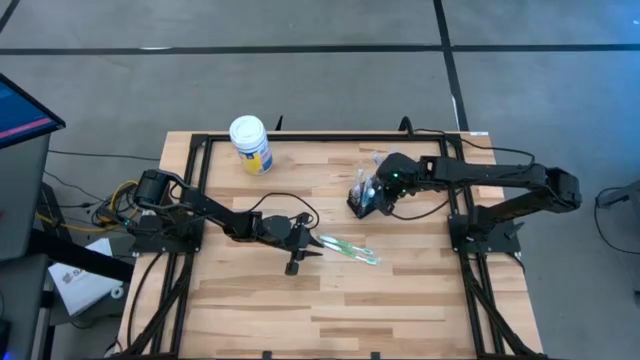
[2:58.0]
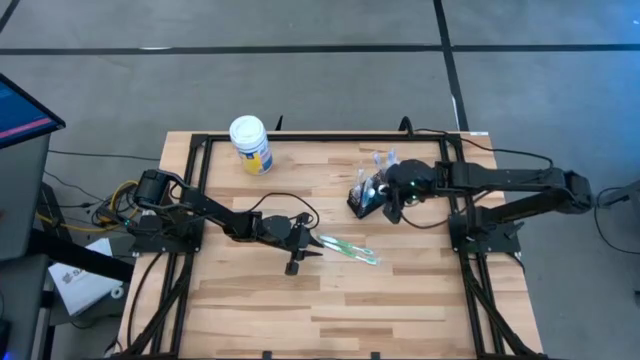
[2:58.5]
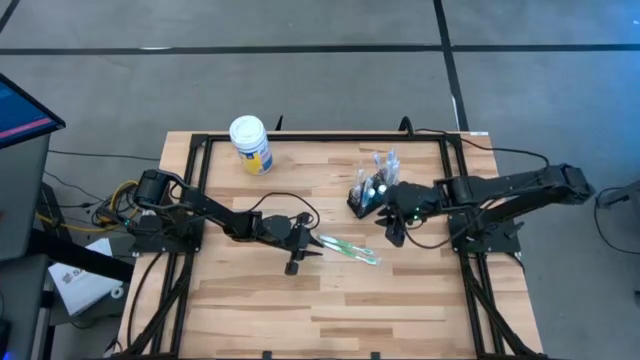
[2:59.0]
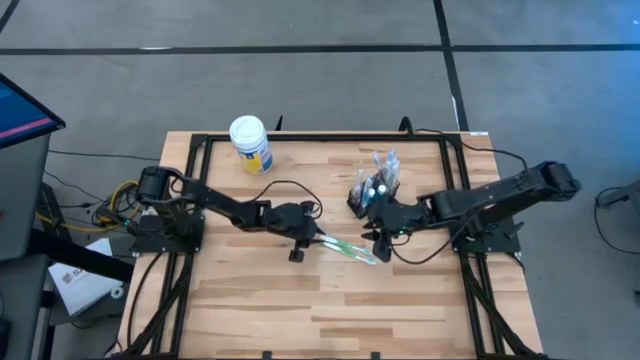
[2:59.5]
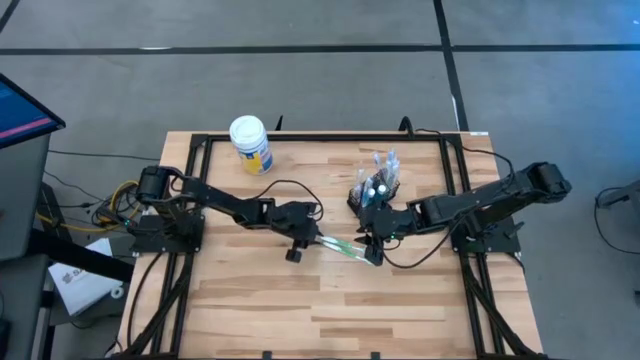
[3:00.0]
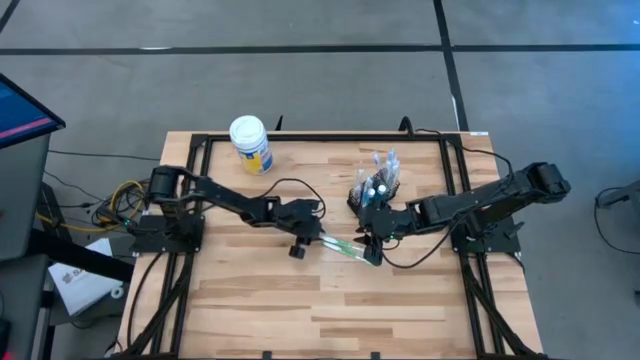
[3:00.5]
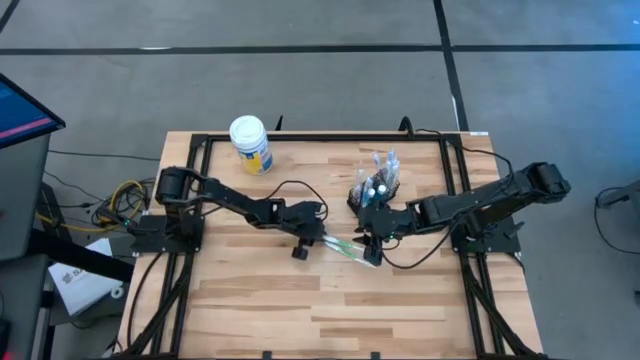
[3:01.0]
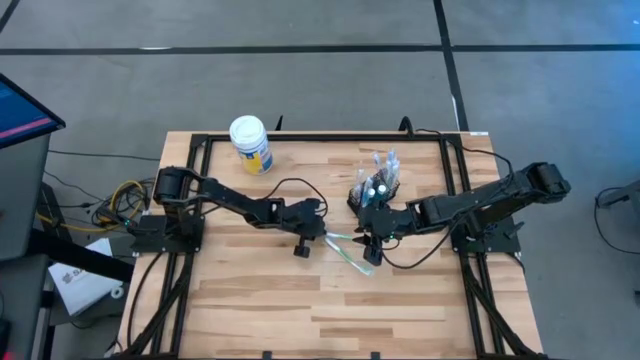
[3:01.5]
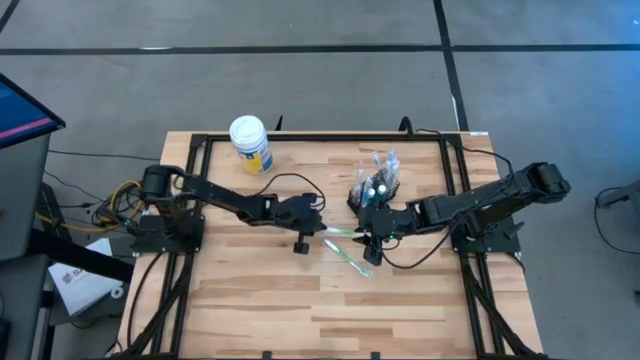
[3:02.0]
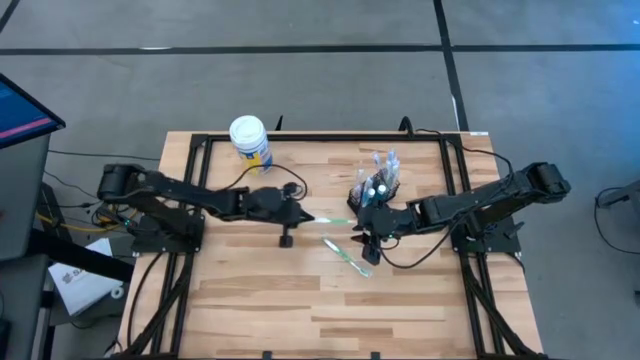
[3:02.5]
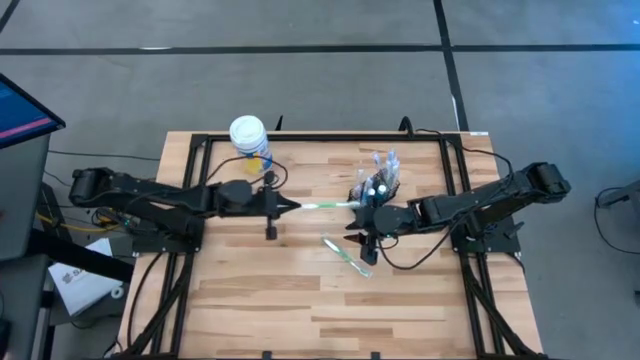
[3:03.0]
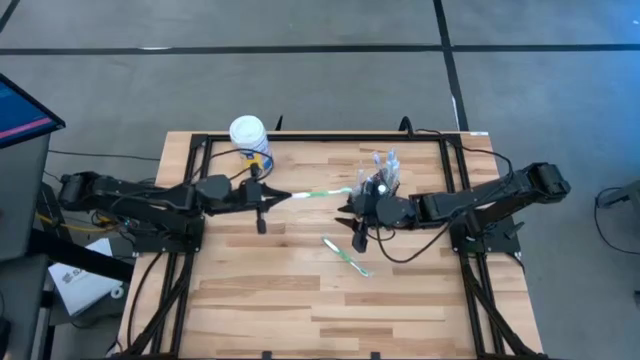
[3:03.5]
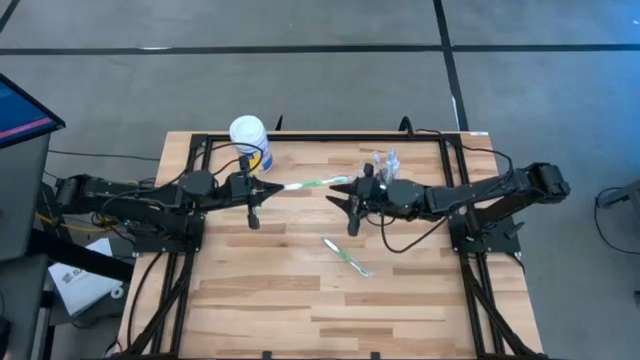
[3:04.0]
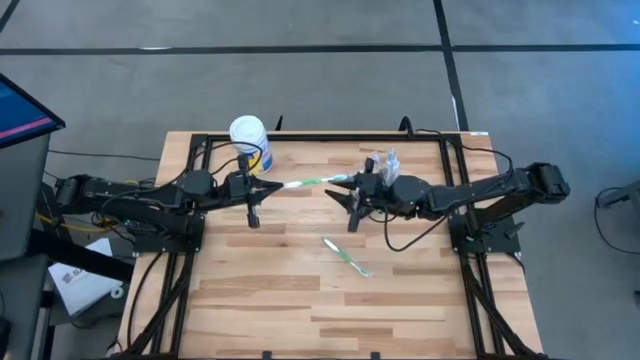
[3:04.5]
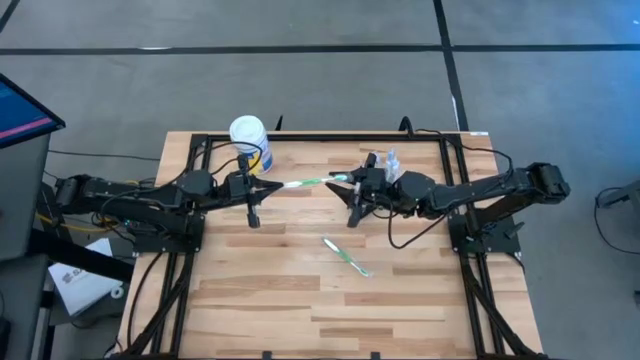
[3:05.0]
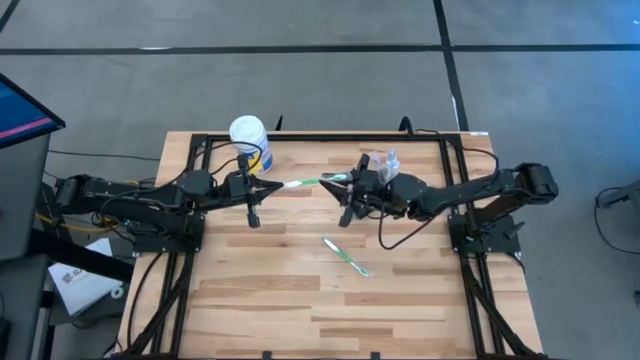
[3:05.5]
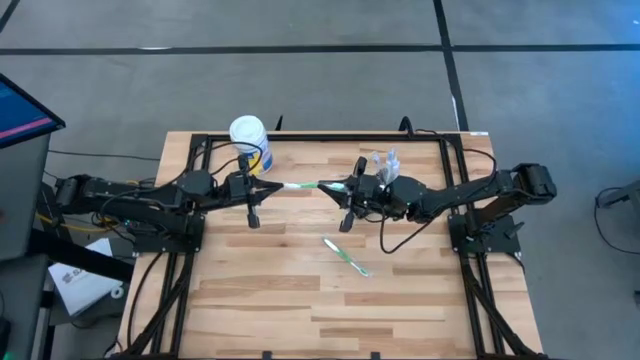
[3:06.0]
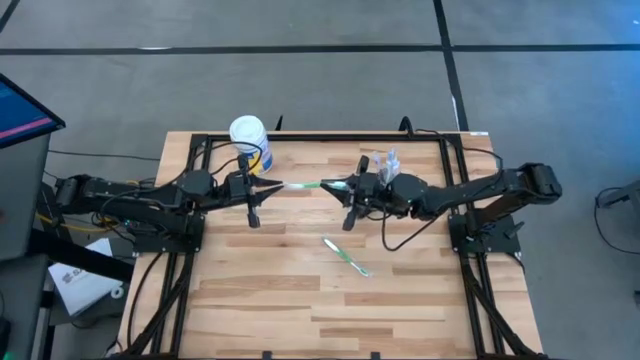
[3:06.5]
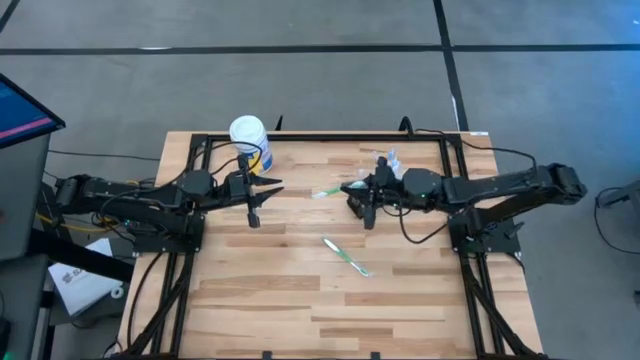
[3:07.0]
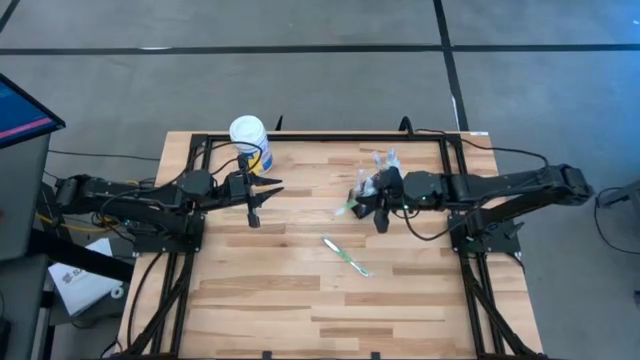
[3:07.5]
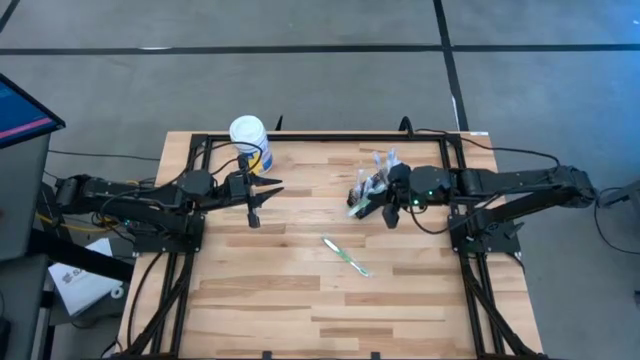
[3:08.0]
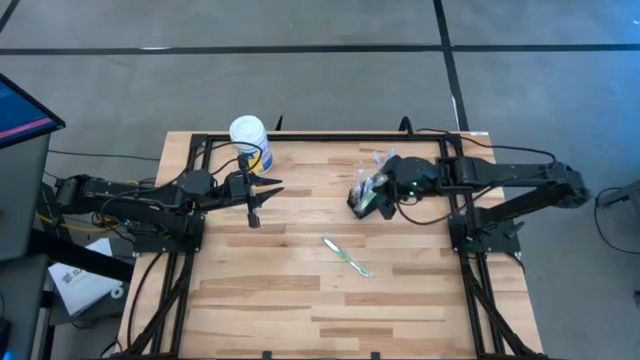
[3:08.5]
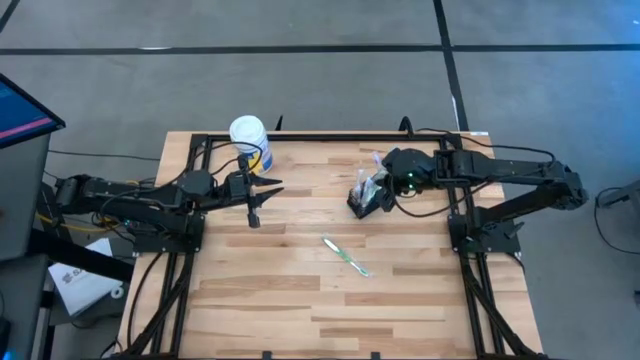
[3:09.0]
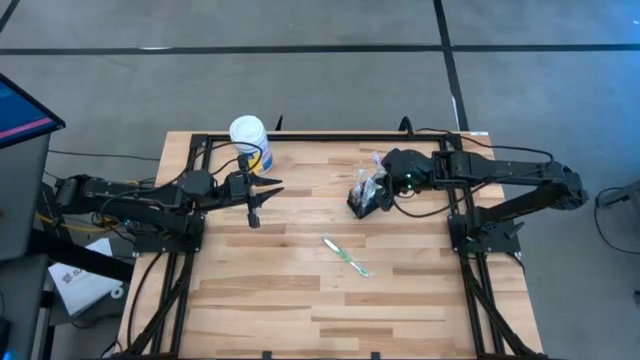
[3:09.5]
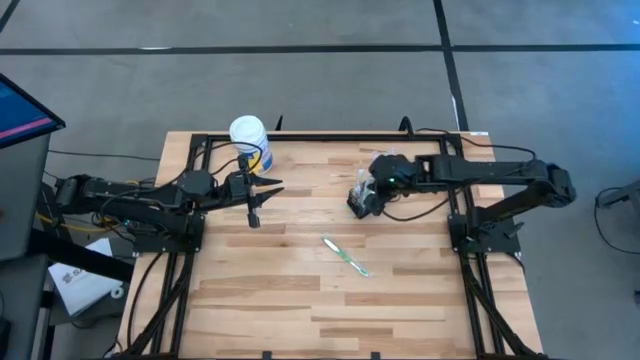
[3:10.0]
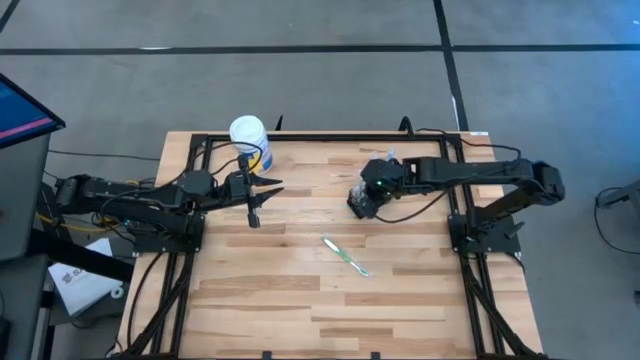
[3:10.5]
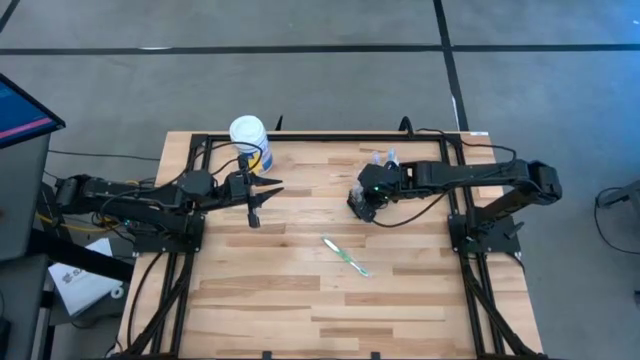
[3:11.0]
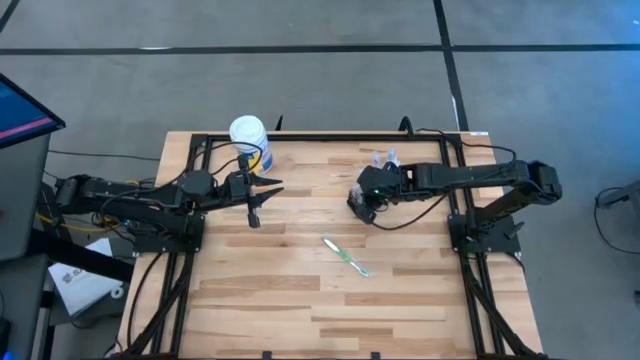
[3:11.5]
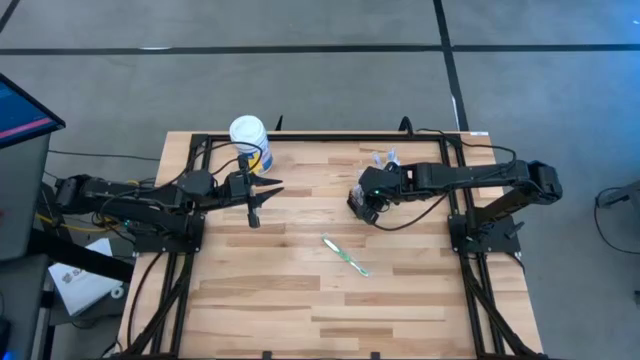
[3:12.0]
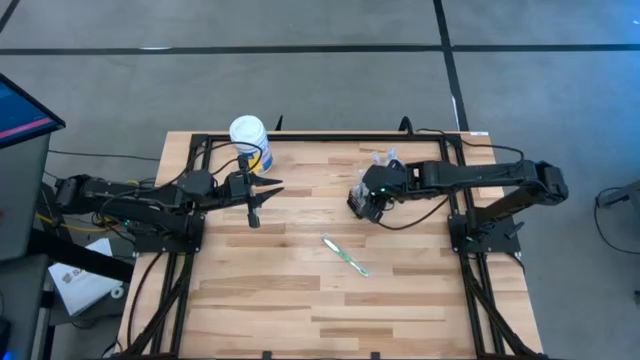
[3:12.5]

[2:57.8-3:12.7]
Task: Pick & Place toothbrushing station
Put the green toothbrush into the mesh organizer

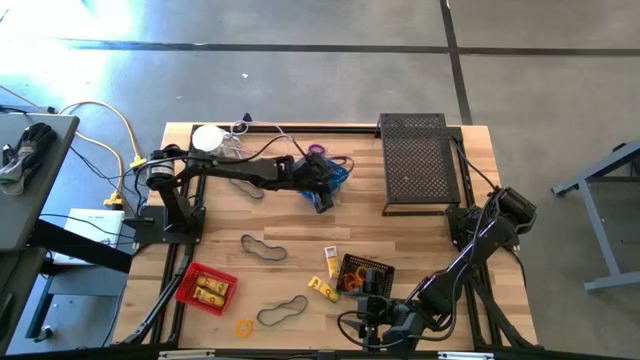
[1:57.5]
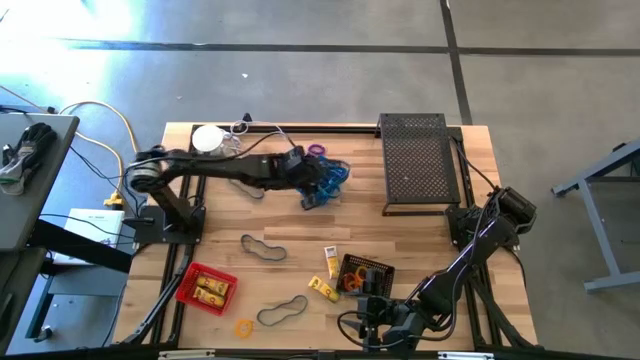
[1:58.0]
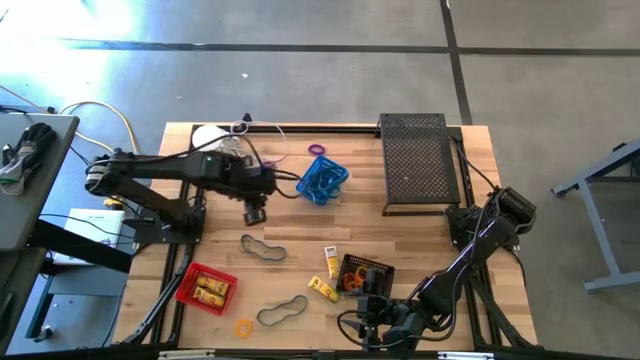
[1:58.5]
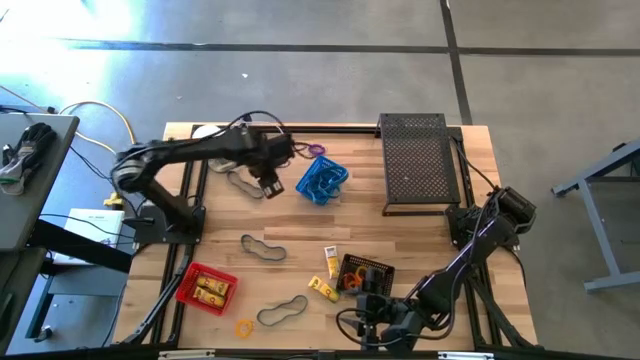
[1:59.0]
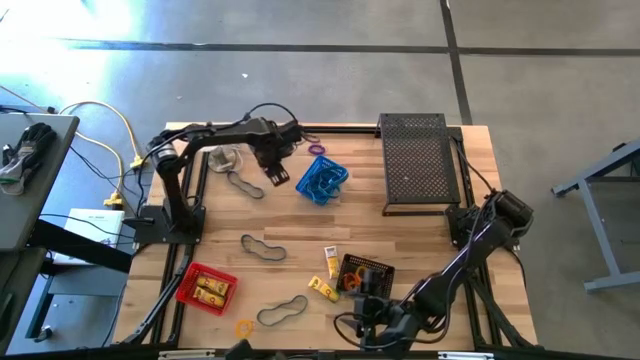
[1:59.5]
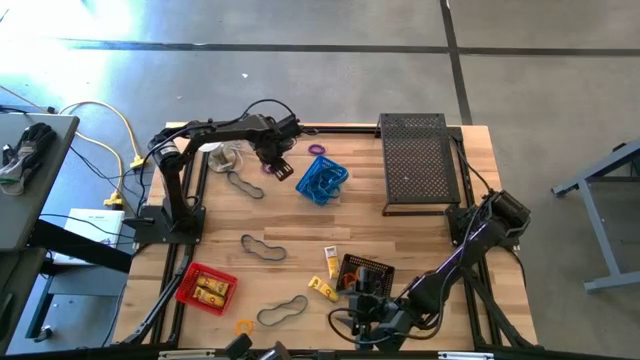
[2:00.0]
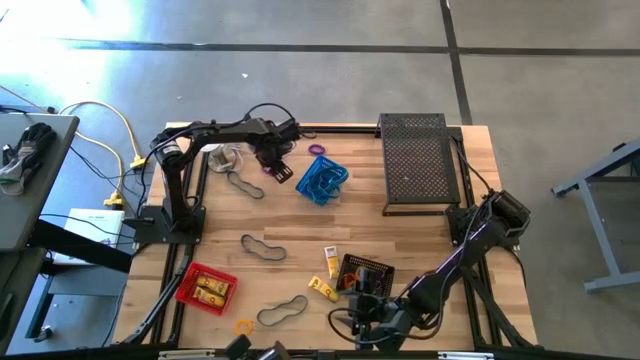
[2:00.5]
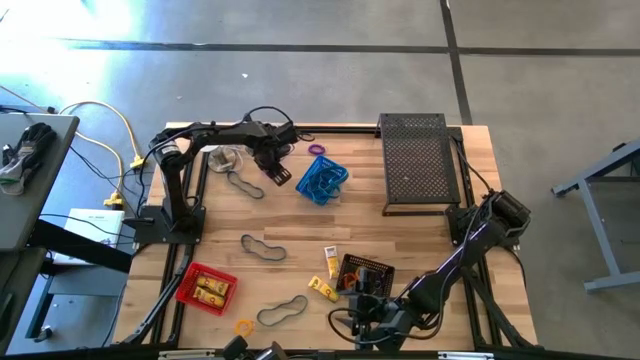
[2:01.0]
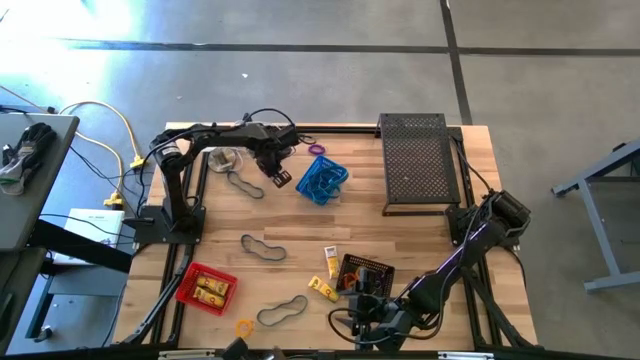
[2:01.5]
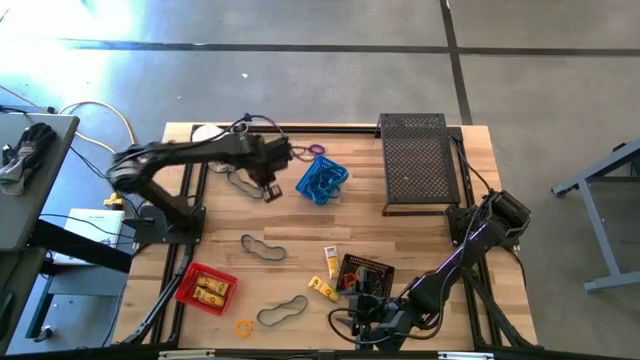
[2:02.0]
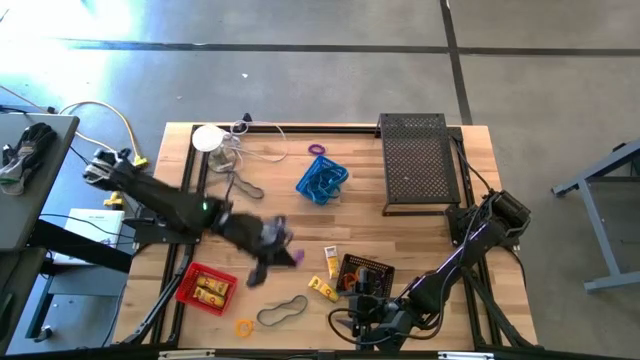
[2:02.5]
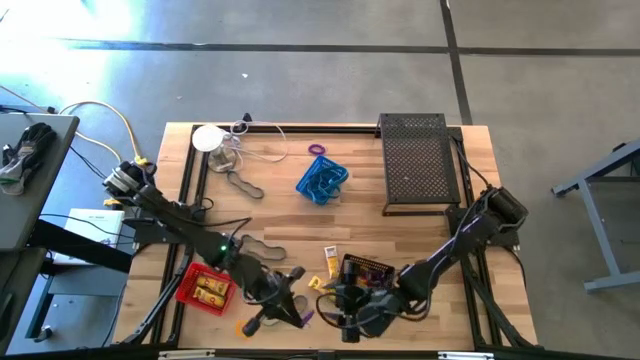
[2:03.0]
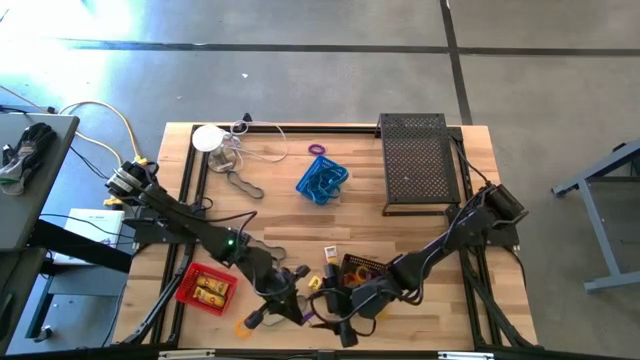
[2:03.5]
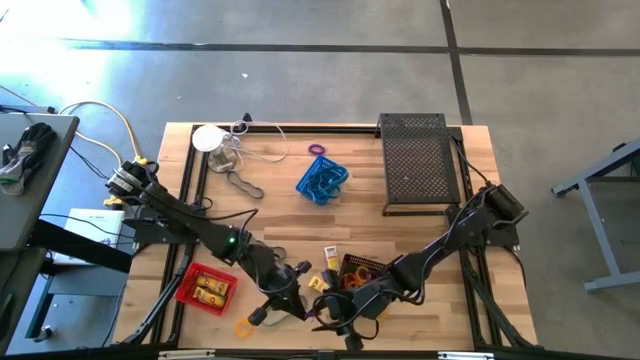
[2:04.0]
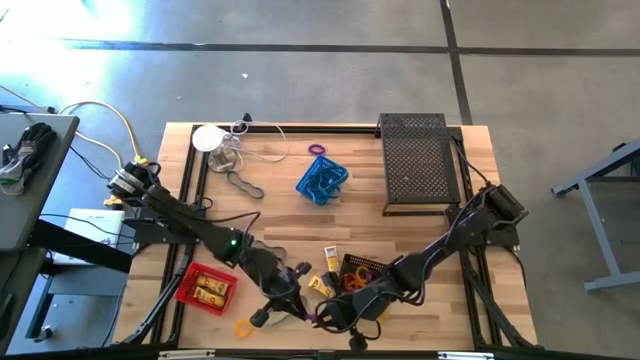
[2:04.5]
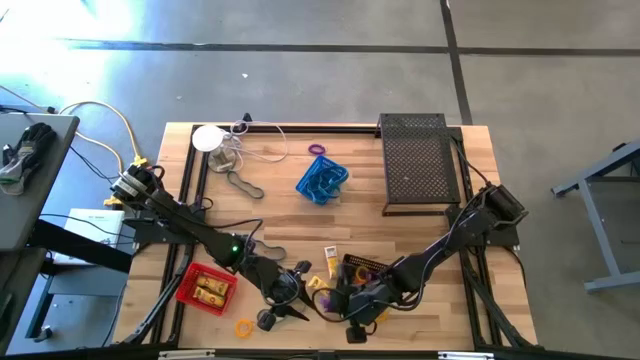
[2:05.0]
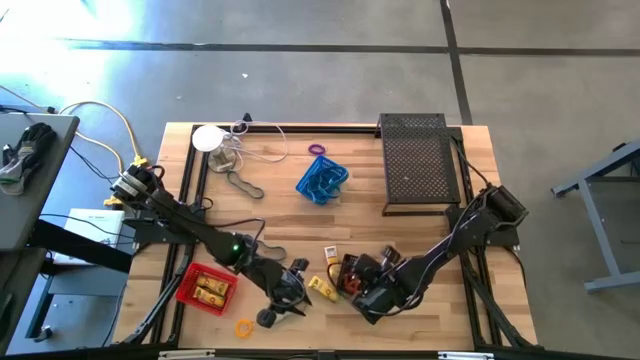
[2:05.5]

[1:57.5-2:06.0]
Task: Pick & Place Office Desk Supplies
Put the middle purple wrist coil keychain into the black bin
